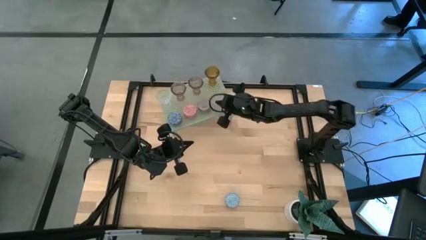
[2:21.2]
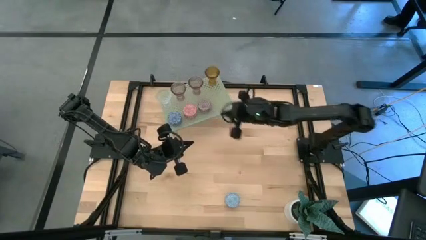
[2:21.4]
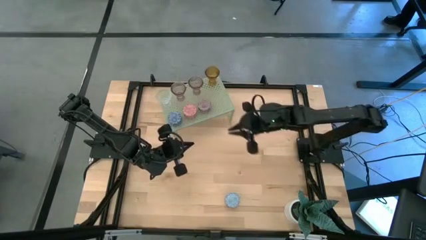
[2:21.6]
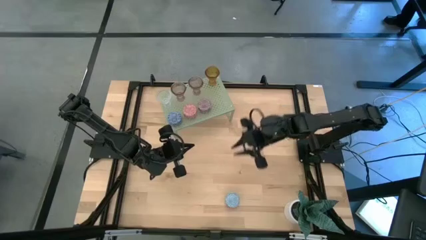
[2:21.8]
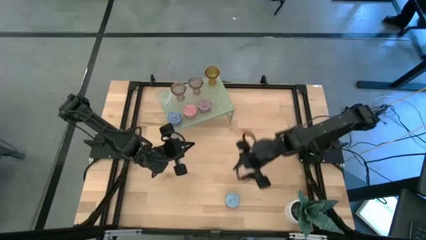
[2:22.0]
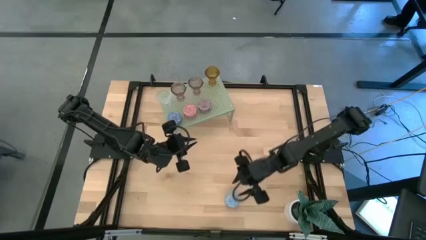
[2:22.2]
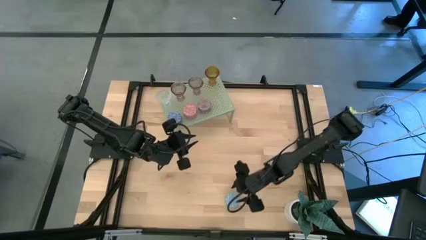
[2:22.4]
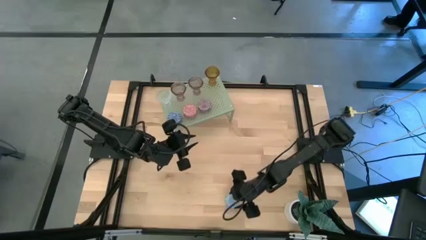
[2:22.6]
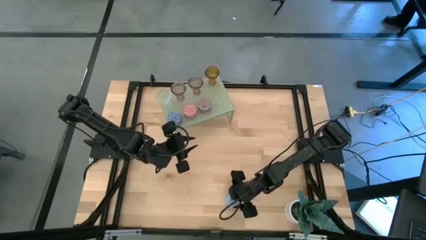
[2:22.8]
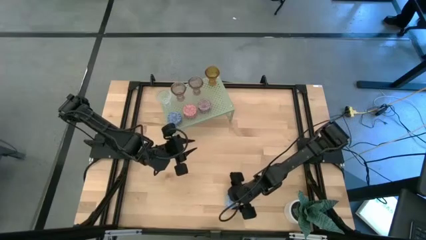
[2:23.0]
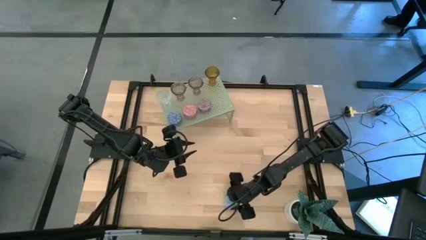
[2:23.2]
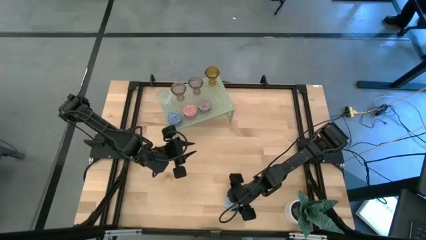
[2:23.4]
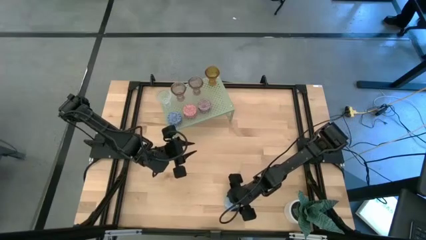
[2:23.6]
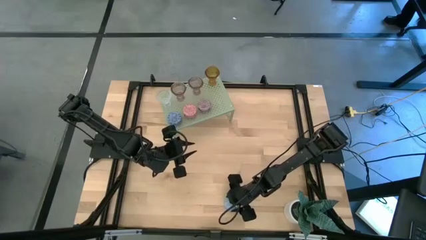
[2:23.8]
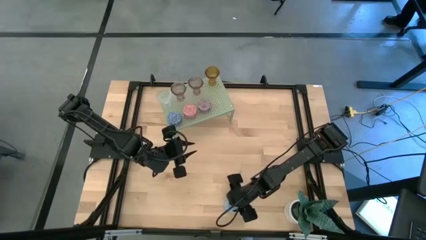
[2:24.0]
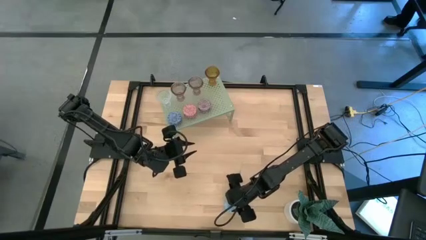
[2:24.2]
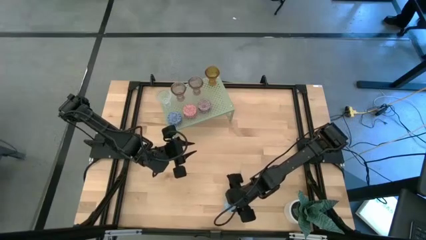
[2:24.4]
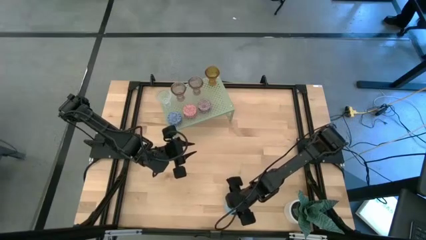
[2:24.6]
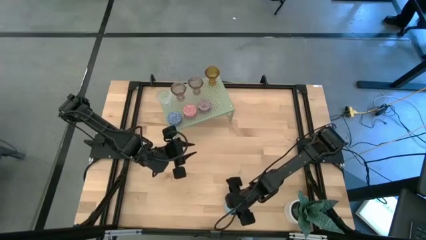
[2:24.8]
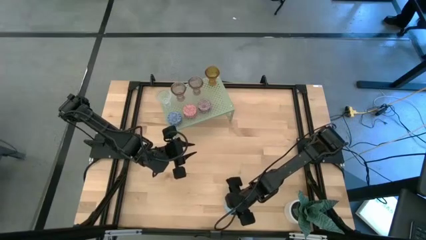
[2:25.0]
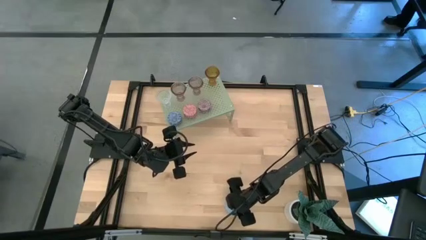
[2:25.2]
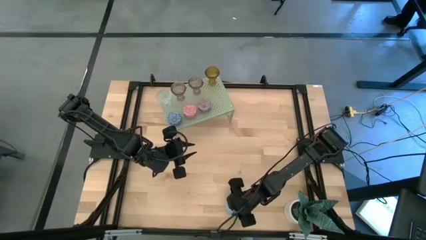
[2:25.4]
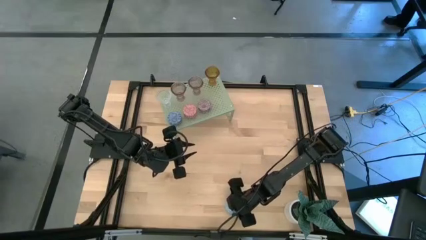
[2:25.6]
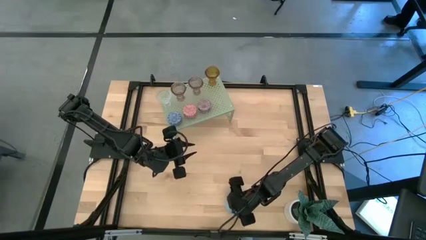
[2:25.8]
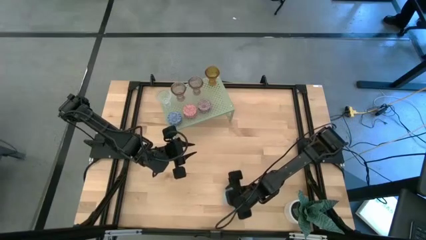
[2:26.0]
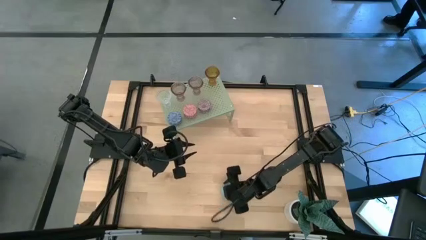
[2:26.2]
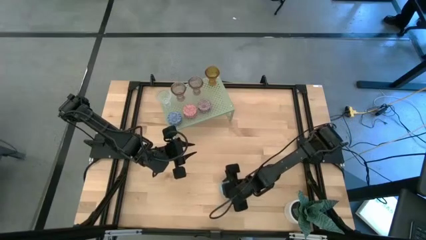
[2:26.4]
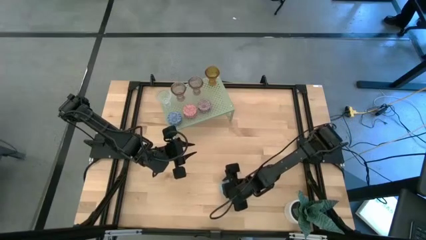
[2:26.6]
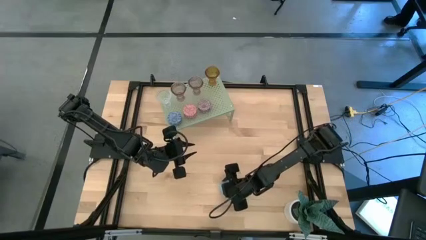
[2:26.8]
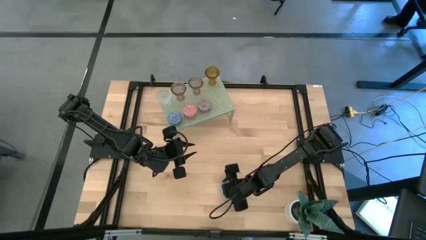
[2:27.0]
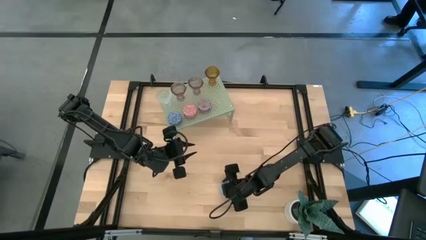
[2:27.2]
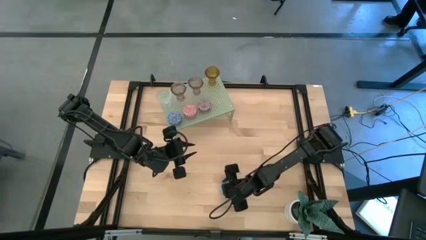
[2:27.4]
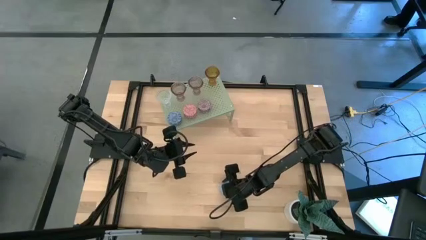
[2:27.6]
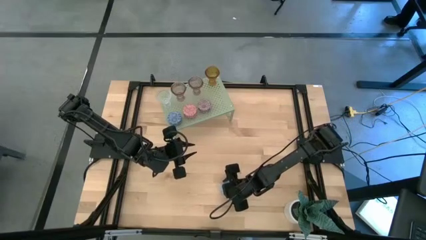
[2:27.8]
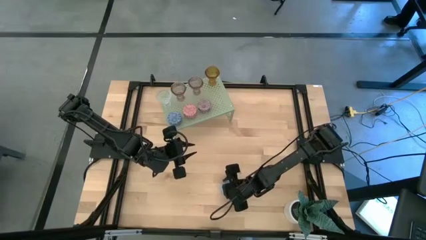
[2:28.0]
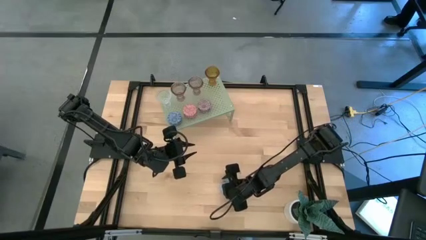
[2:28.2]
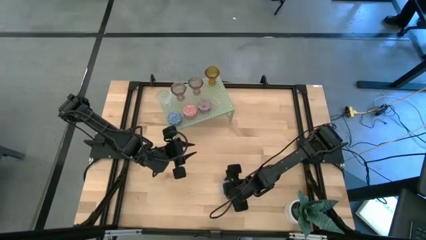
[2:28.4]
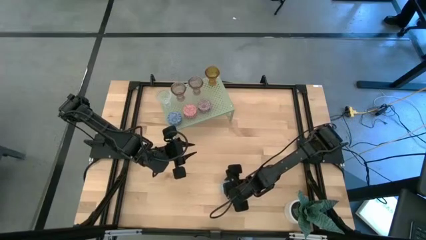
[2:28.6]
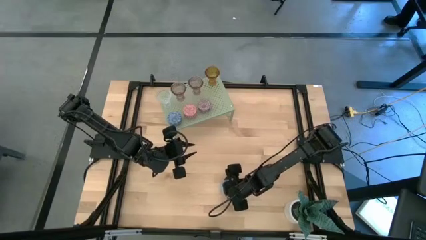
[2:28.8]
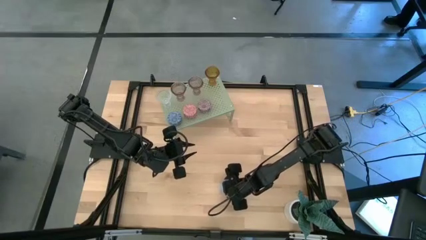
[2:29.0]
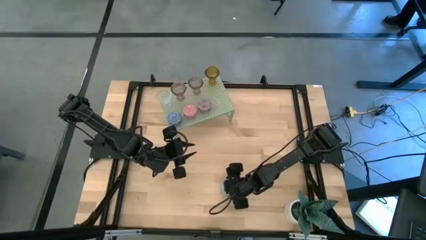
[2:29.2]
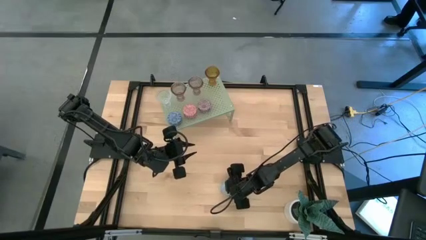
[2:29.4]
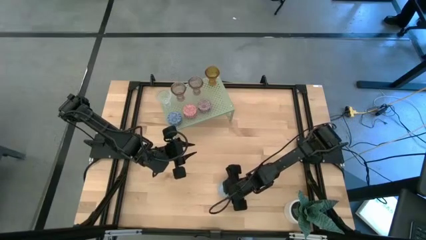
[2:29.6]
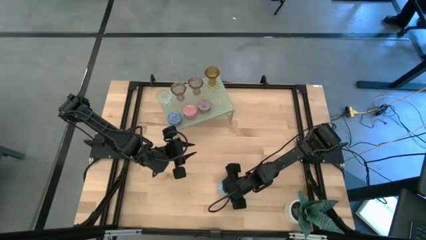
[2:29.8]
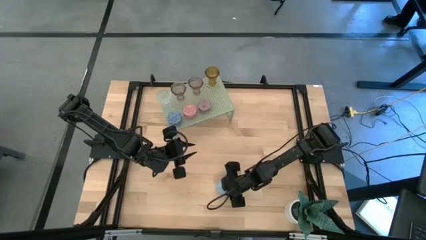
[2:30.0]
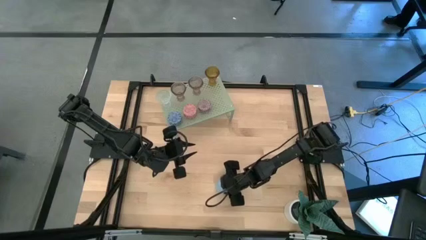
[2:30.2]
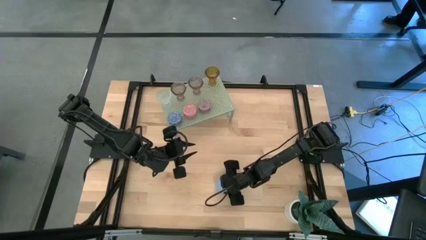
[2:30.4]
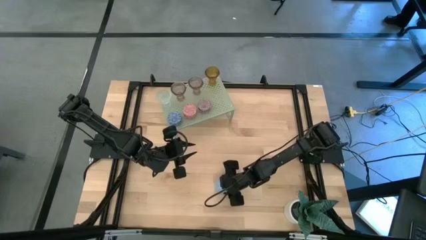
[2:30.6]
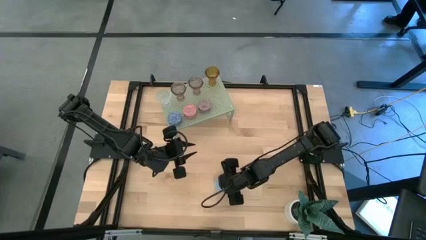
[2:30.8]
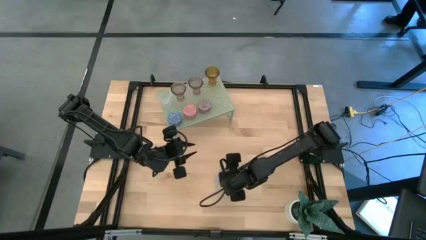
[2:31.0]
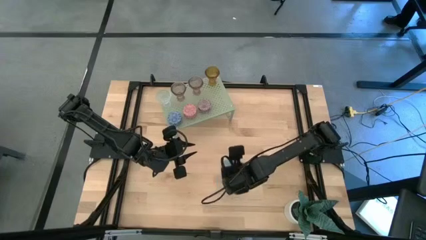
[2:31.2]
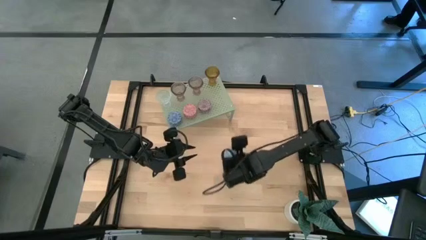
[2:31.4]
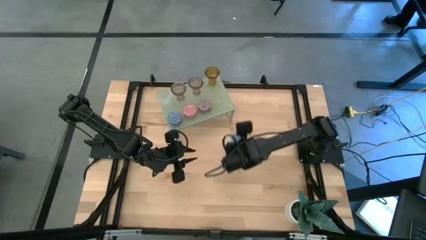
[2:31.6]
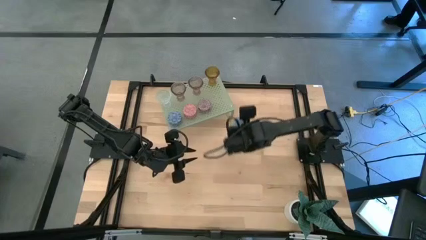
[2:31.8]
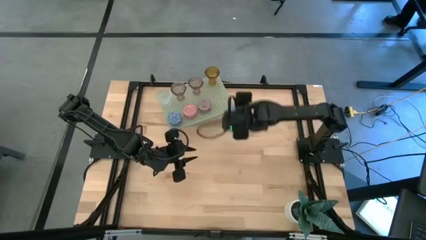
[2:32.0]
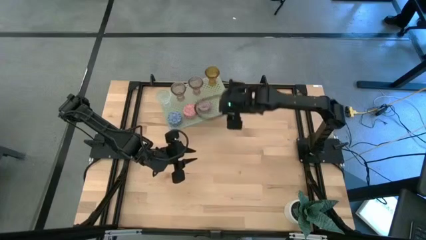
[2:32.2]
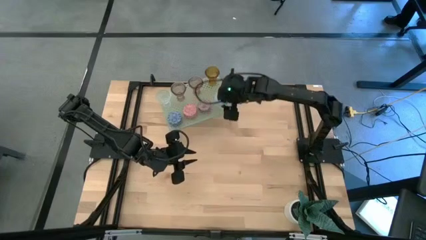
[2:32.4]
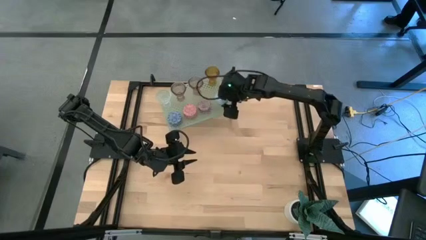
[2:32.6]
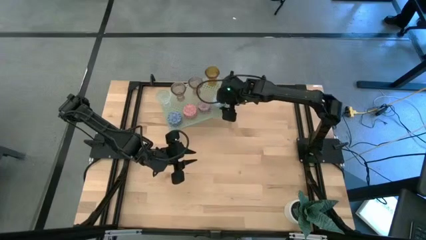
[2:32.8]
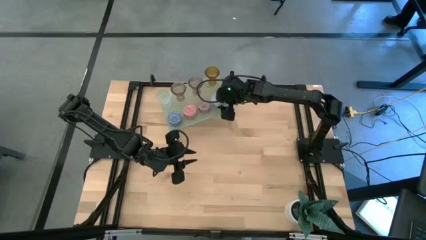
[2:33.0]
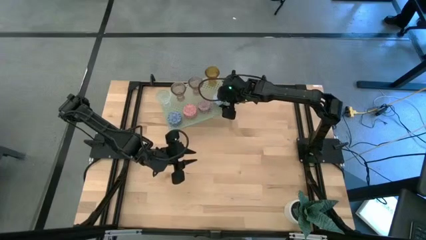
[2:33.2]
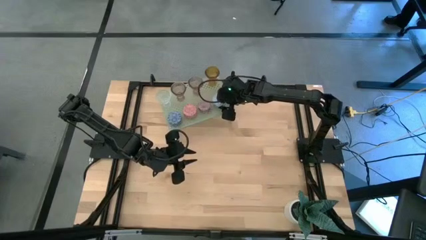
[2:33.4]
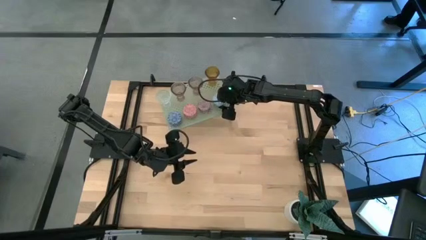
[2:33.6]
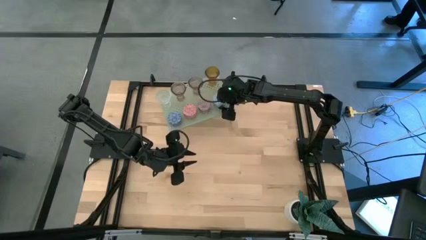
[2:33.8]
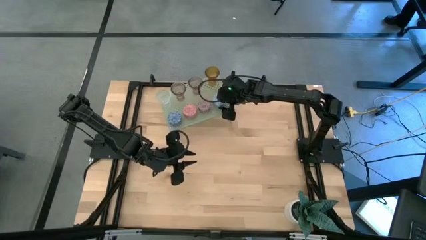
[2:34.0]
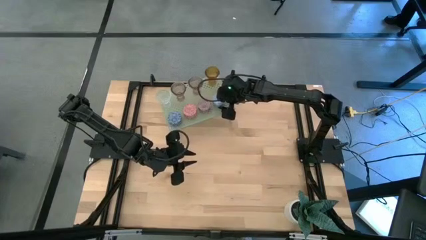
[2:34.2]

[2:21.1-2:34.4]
Task: Pick & Place candle stick holders
Put the light blue scented candle on the shelf aligned with the other scented candles
